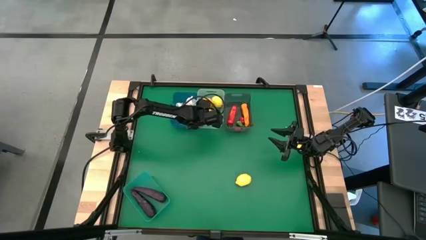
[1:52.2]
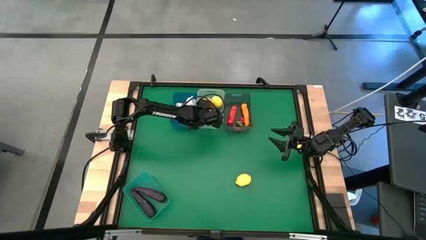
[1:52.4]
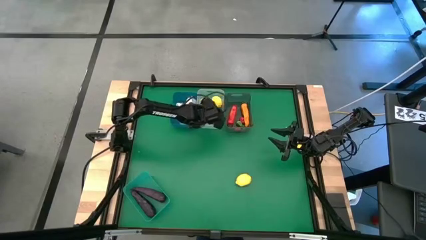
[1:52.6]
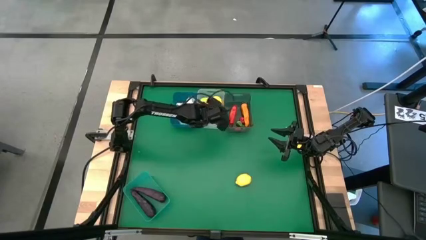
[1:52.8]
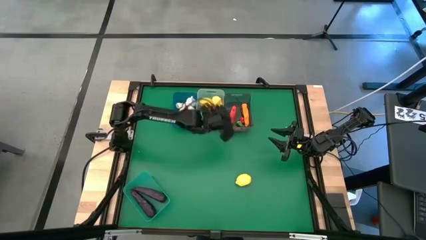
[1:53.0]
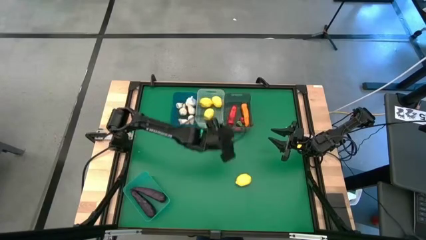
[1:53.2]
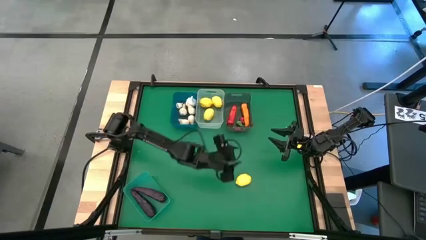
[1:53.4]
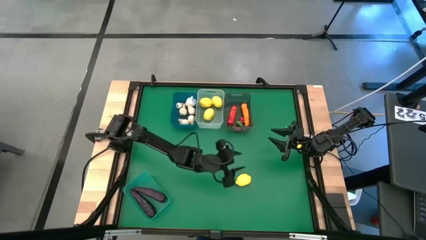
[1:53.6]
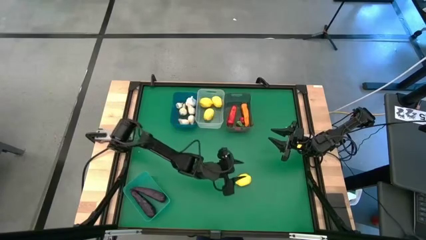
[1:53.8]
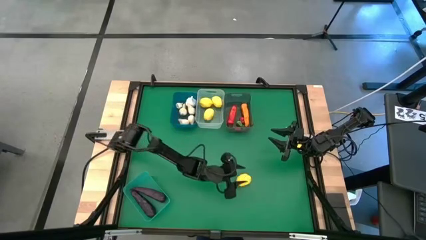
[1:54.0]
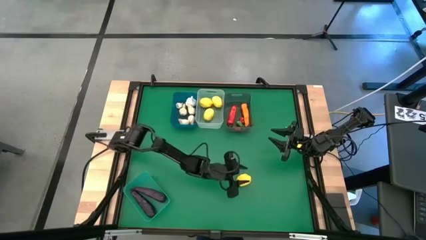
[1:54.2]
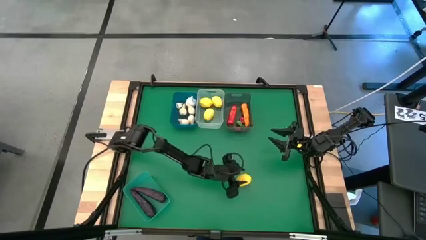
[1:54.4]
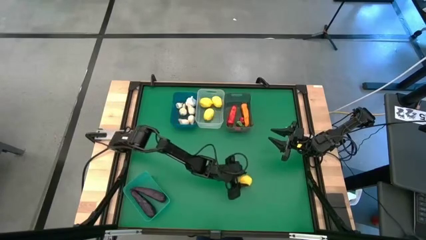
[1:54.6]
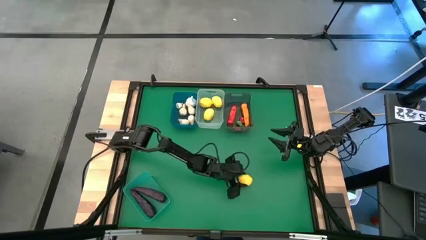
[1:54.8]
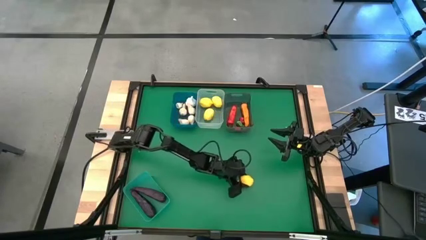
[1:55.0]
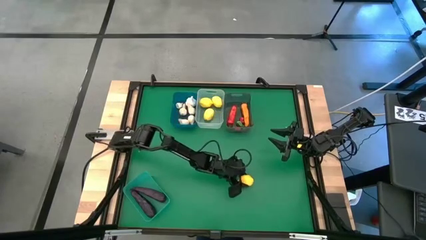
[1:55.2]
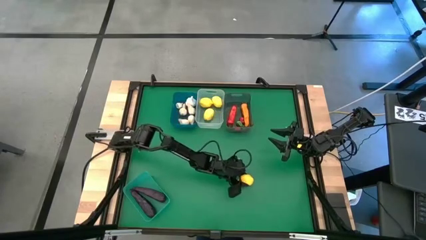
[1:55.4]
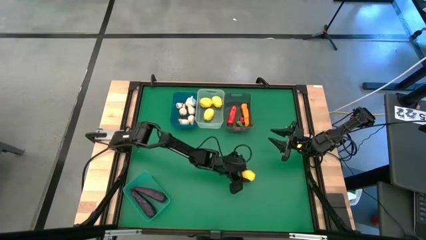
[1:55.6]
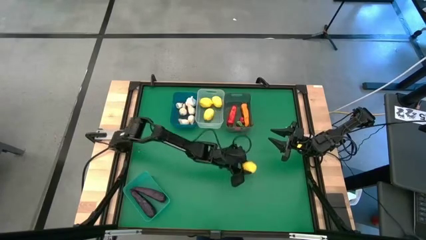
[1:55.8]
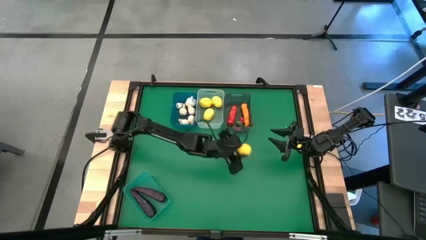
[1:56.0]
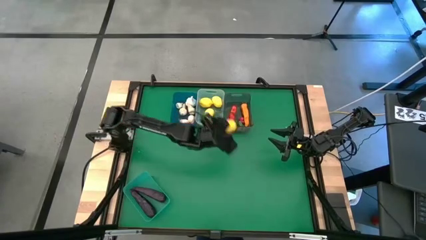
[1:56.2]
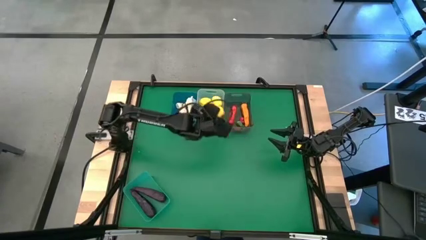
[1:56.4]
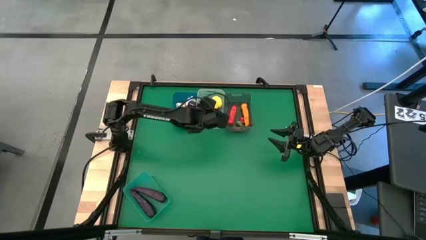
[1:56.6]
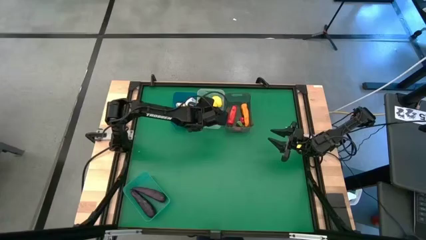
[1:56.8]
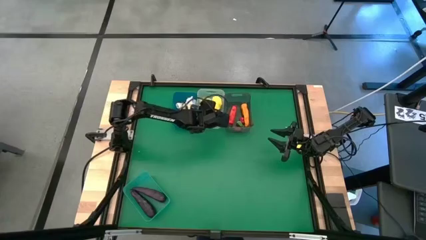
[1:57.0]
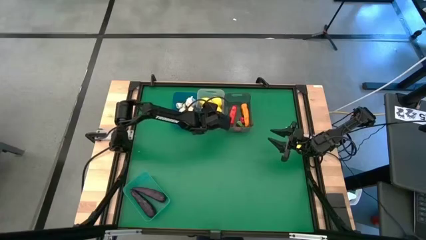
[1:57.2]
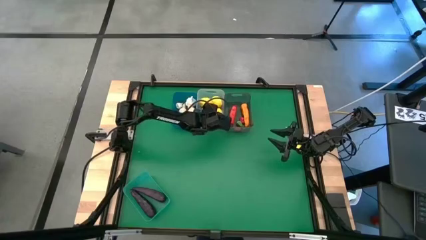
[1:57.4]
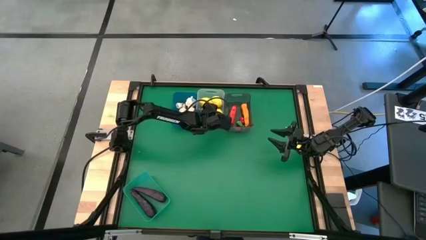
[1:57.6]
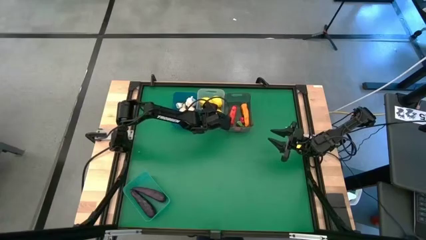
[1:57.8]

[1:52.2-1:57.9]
Task: Sort produce into baskets
Put the yellow lemon into the white bin

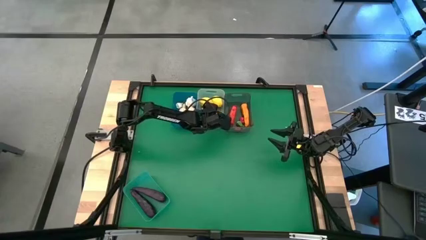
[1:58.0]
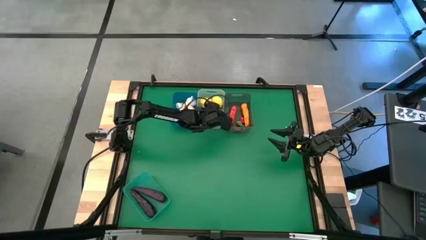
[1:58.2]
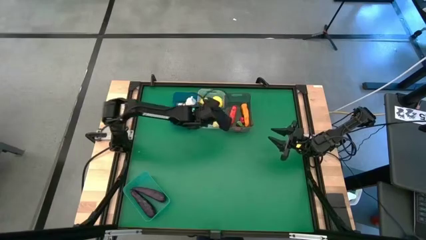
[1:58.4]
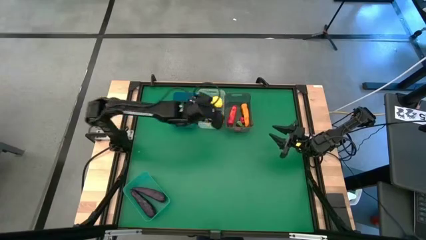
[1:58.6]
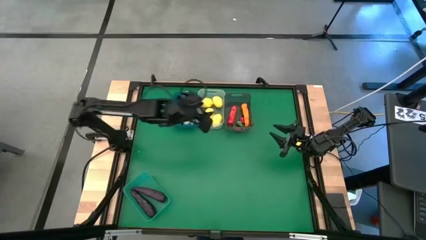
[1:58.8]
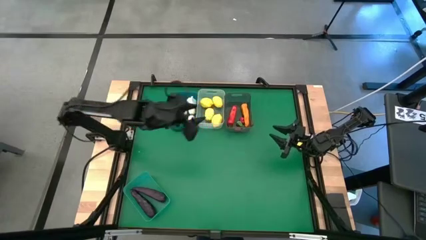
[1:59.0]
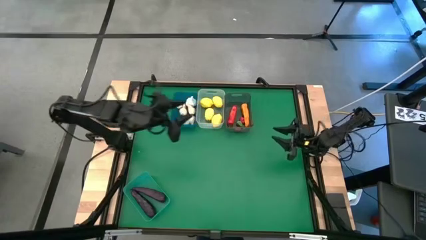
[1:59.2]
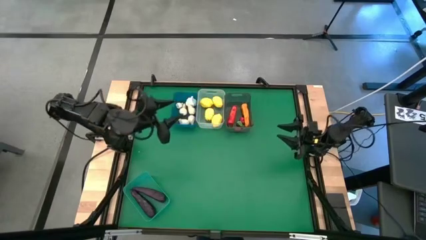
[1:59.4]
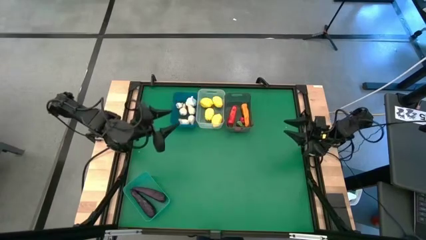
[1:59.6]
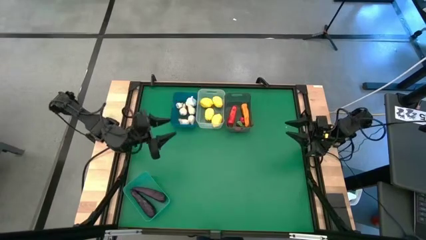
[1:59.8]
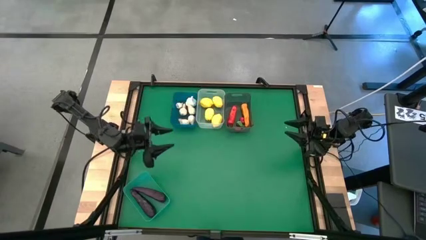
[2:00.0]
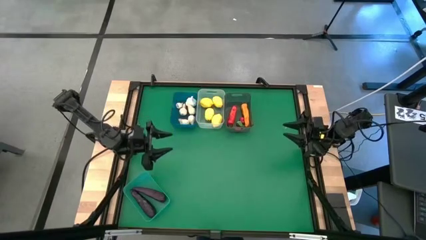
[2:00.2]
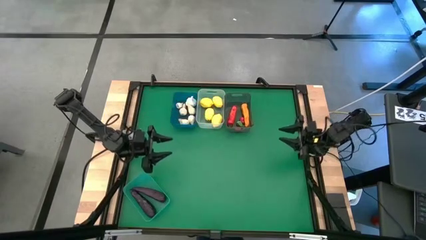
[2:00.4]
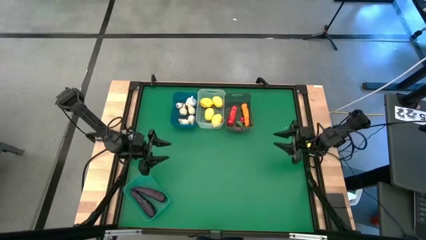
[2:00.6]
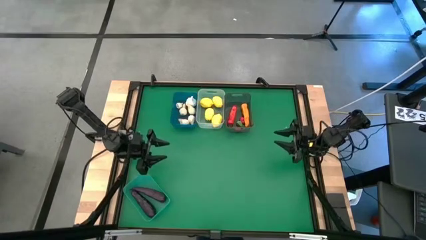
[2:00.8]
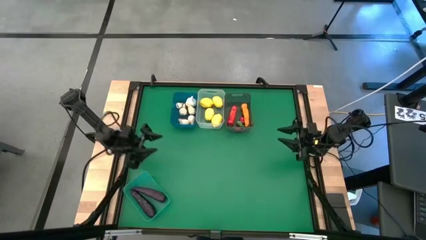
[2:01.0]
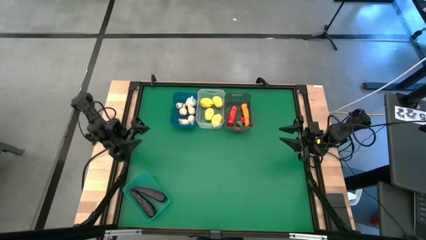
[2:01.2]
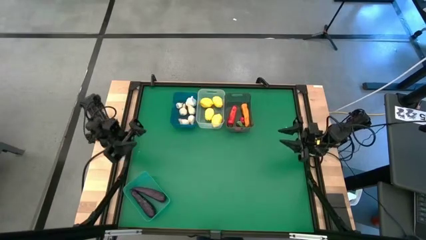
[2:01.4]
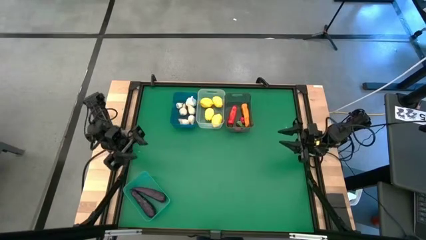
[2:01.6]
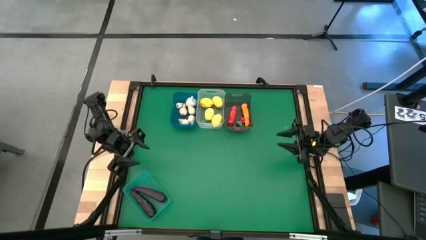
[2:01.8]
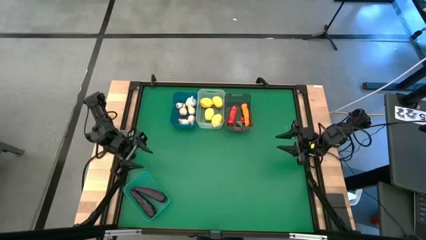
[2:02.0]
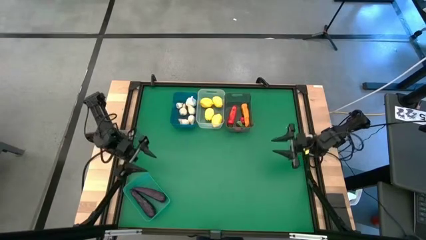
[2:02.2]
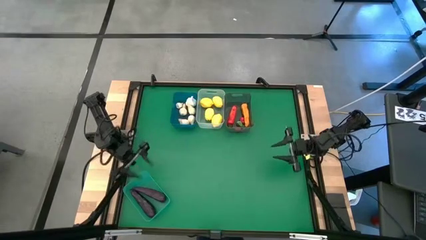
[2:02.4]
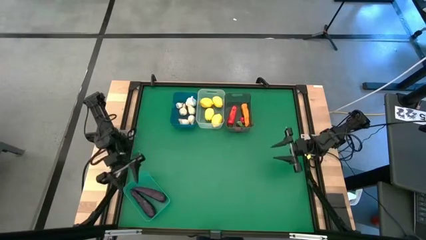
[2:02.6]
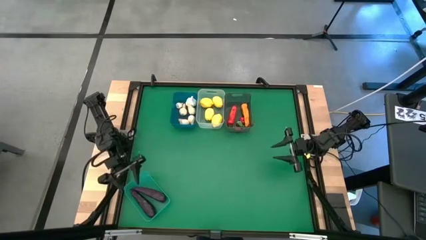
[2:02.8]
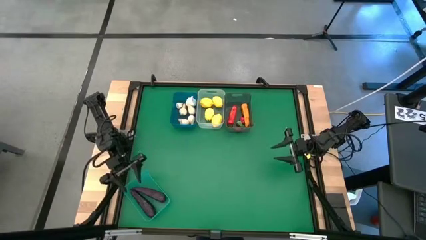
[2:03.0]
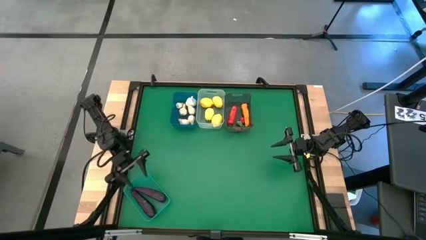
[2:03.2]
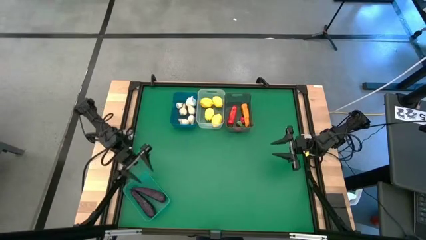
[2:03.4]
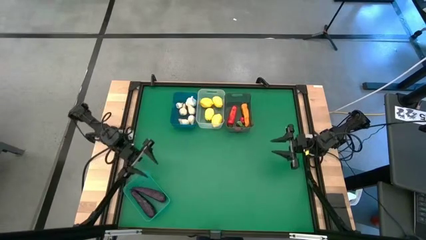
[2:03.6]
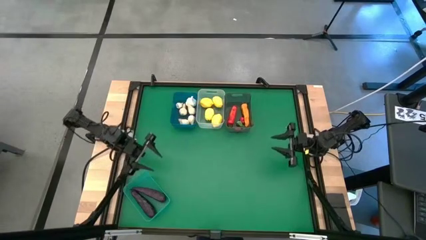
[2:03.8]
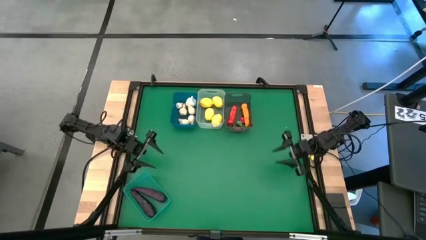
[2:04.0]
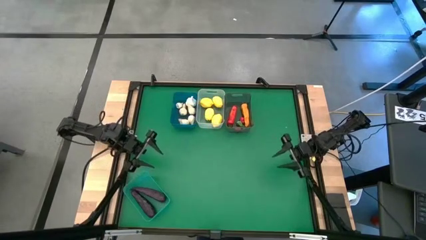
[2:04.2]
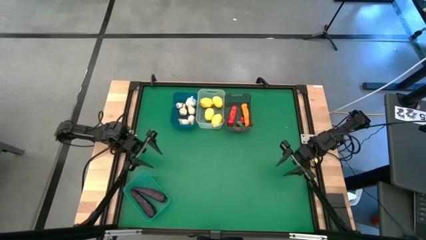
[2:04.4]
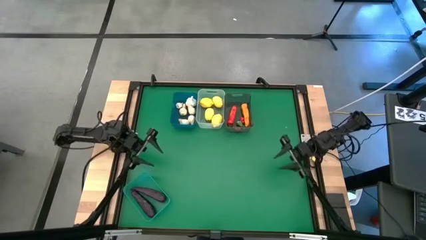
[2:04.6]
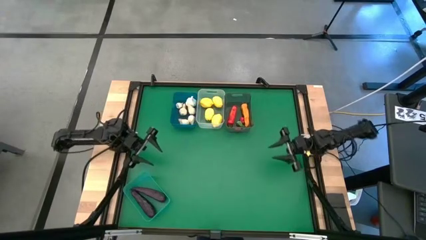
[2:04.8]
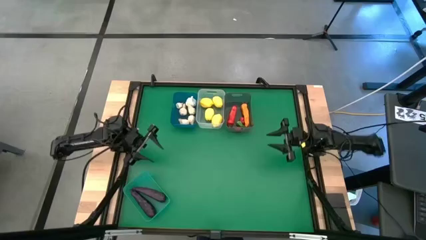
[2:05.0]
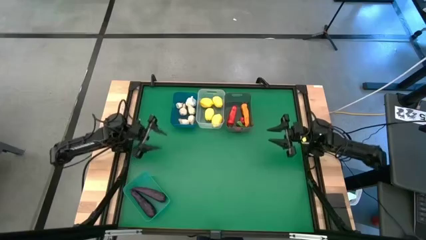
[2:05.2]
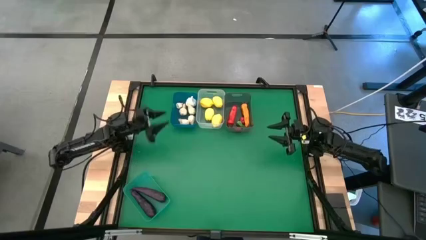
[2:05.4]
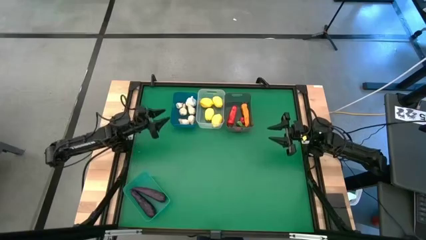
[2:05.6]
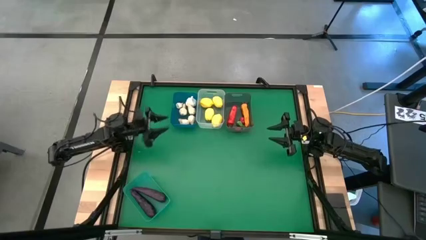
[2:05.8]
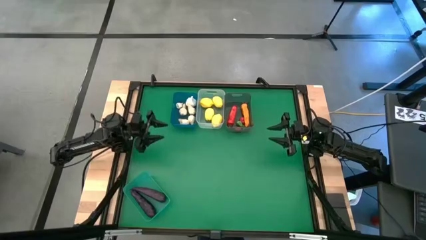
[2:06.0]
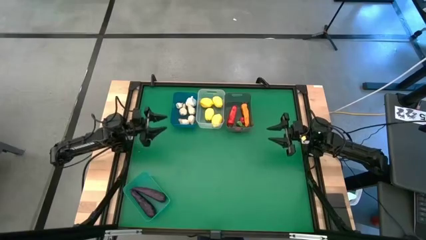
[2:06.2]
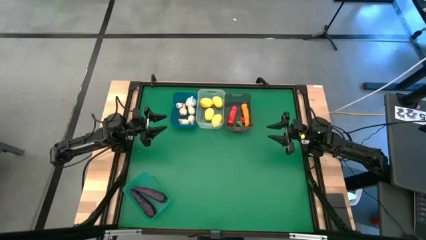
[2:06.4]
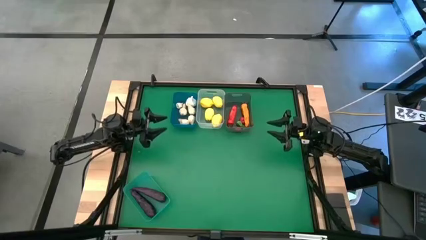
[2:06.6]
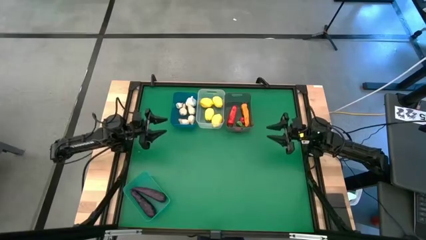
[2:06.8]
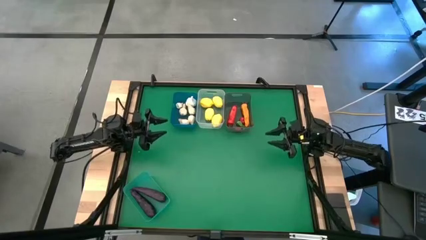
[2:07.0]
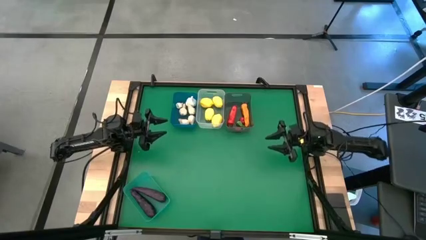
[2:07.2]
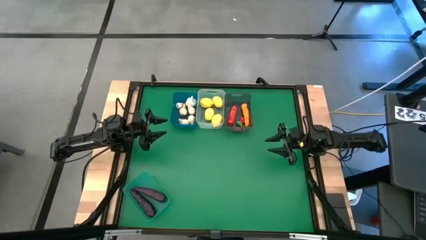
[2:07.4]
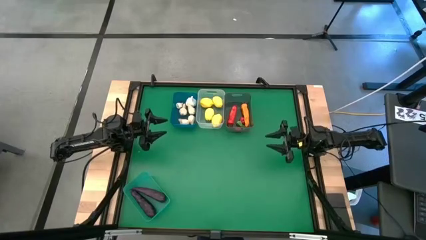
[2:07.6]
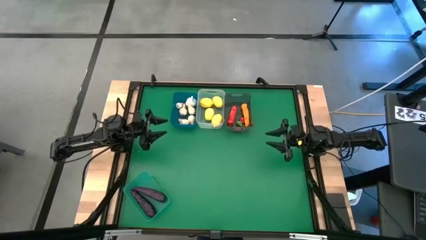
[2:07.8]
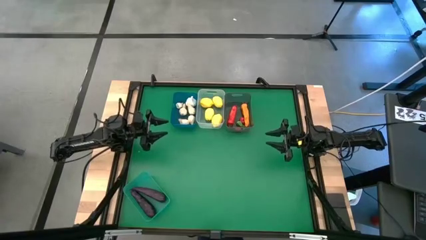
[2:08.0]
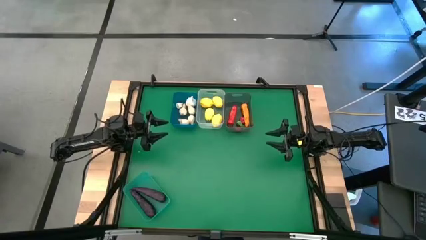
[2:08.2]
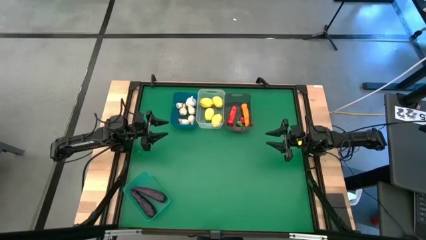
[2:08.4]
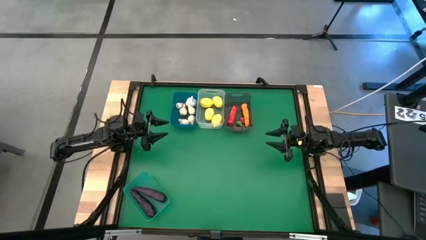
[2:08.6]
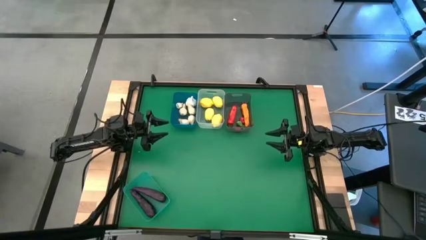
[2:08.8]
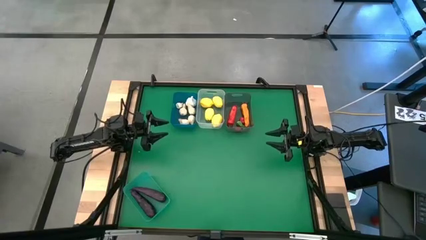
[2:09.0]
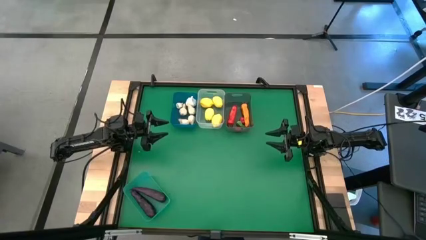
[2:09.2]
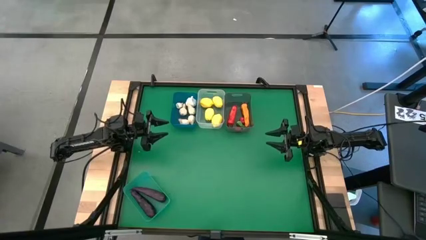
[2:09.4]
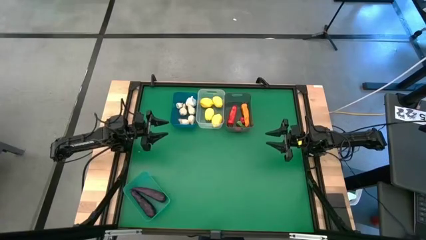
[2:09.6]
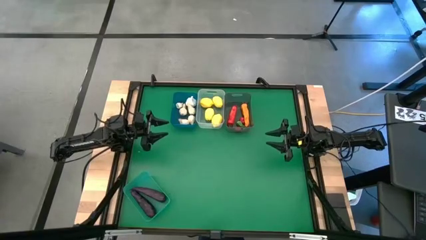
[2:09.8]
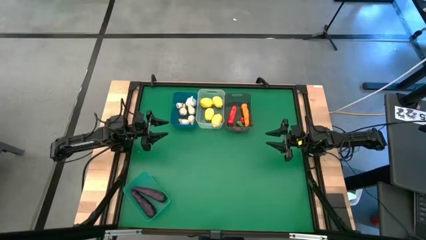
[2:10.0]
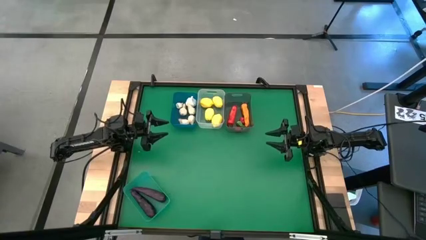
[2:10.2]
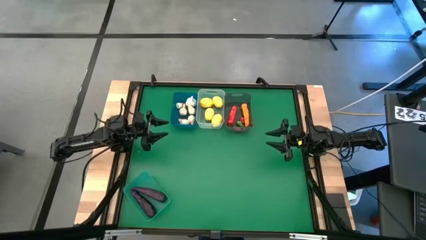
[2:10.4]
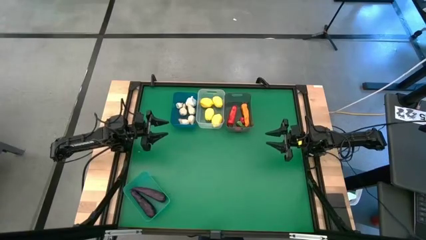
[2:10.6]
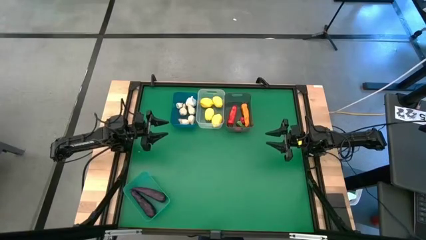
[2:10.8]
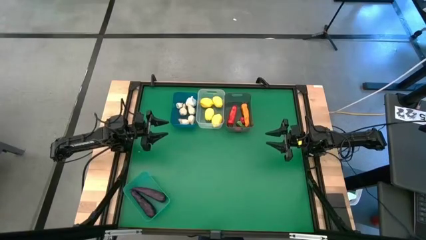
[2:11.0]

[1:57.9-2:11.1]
Return to Home Position
